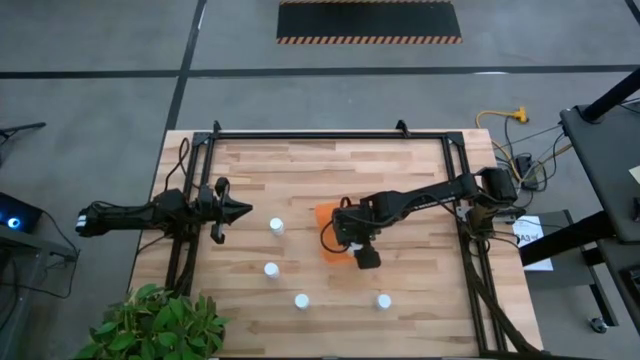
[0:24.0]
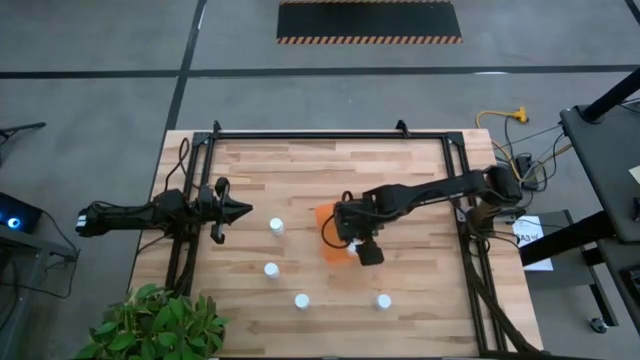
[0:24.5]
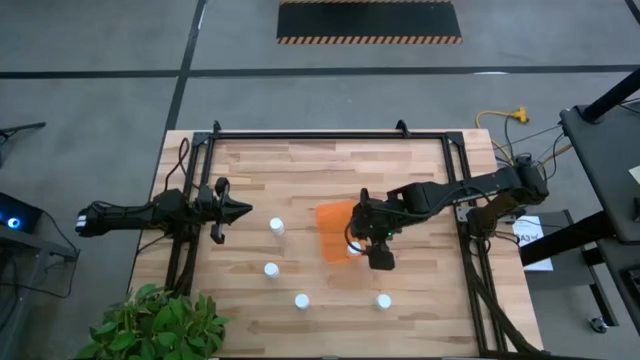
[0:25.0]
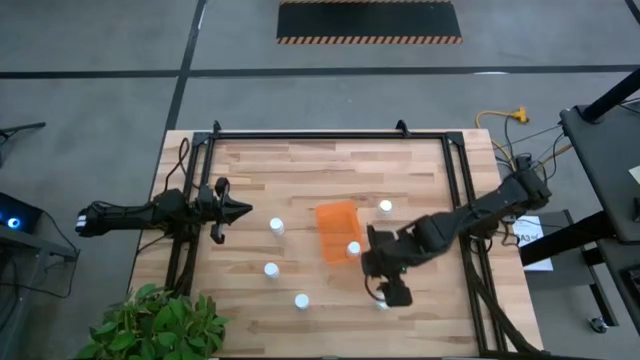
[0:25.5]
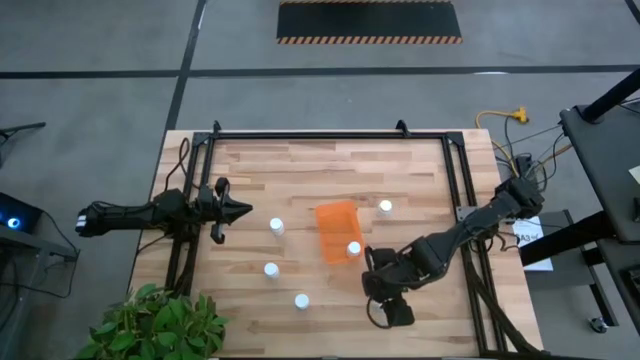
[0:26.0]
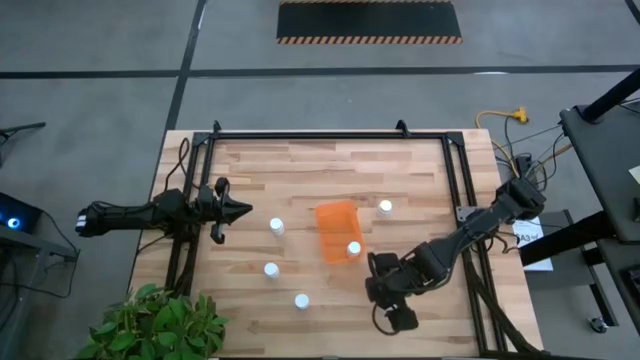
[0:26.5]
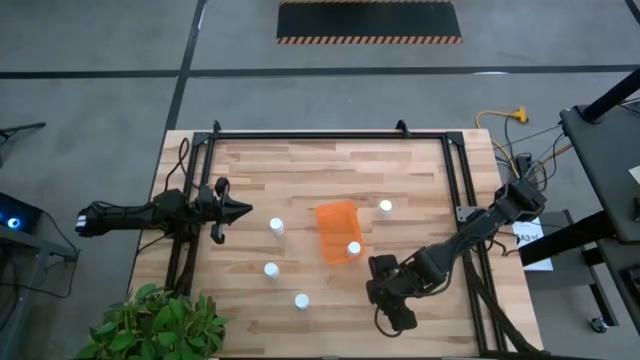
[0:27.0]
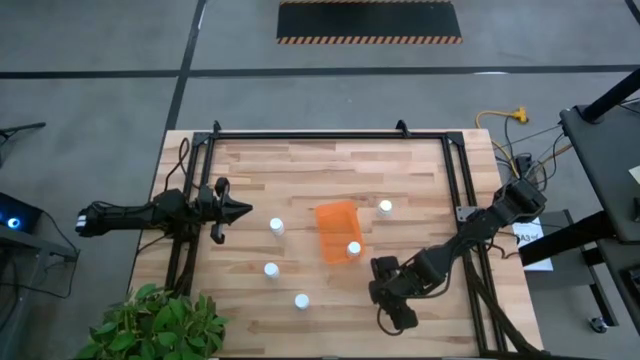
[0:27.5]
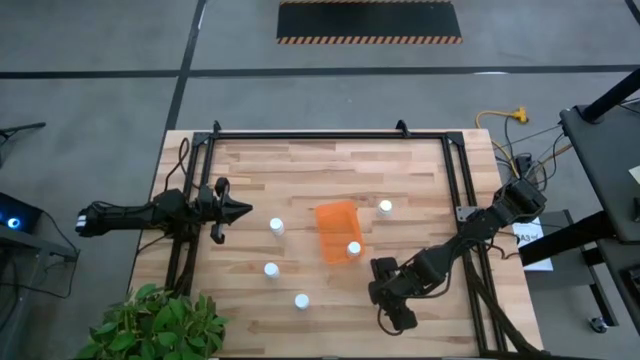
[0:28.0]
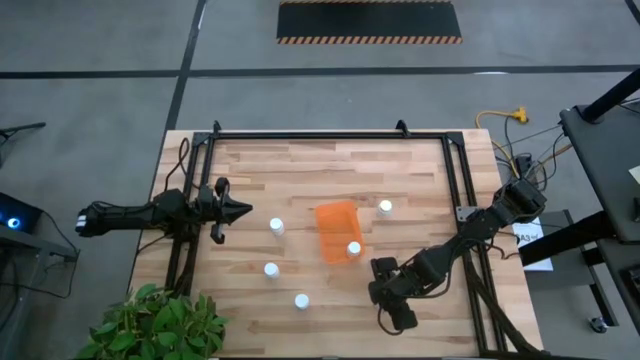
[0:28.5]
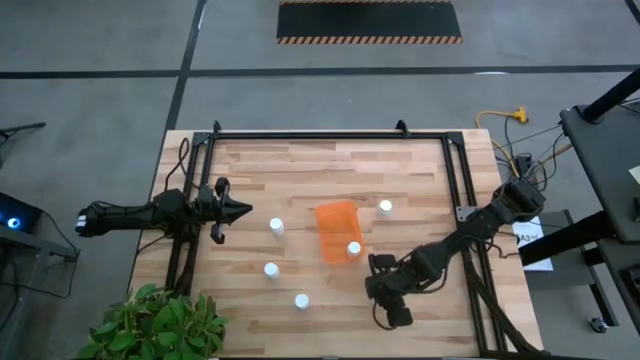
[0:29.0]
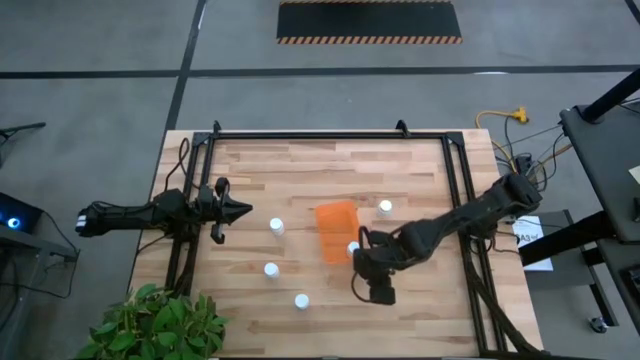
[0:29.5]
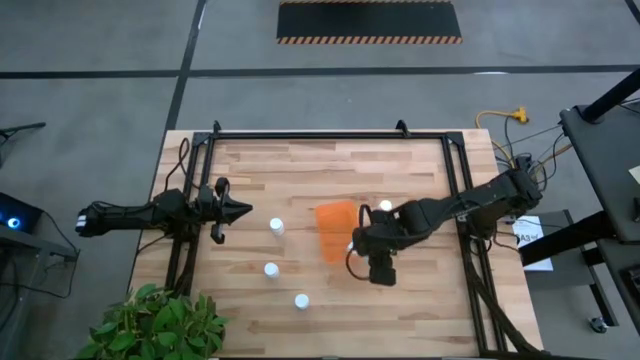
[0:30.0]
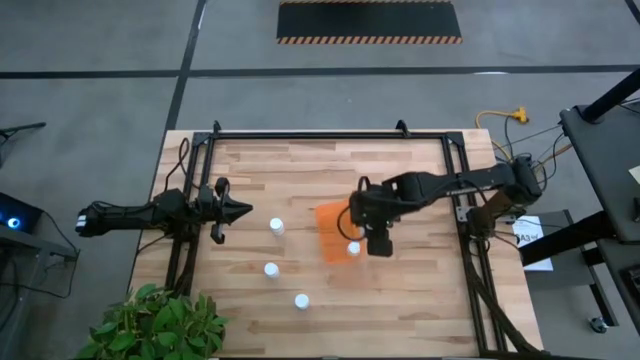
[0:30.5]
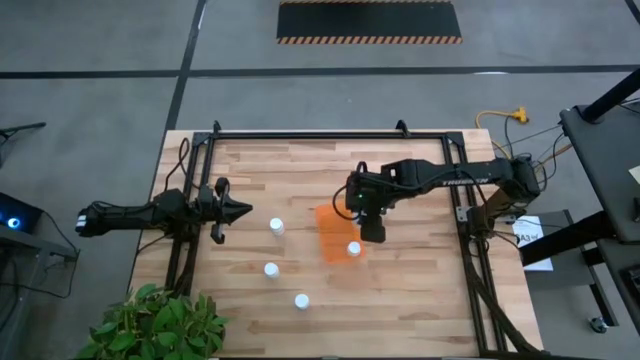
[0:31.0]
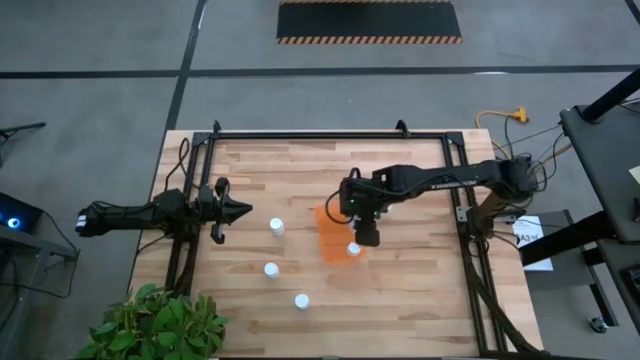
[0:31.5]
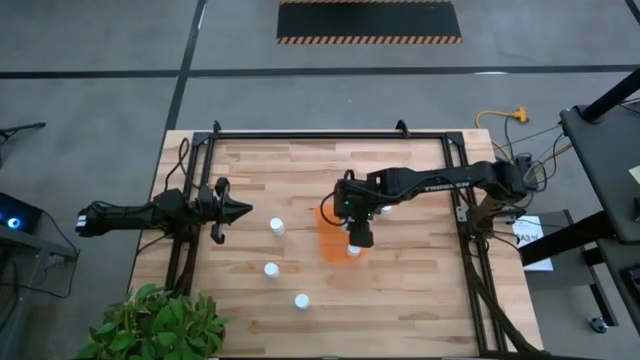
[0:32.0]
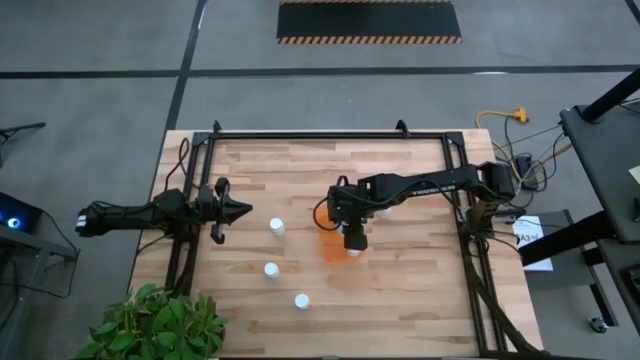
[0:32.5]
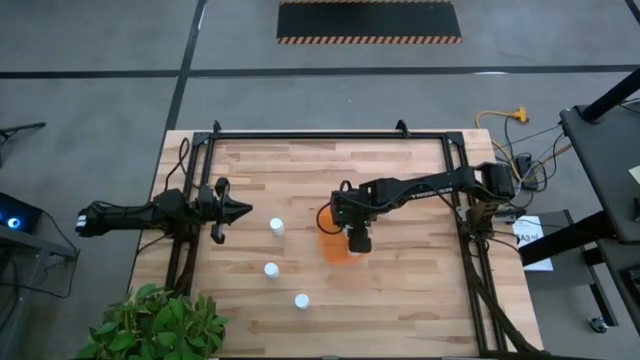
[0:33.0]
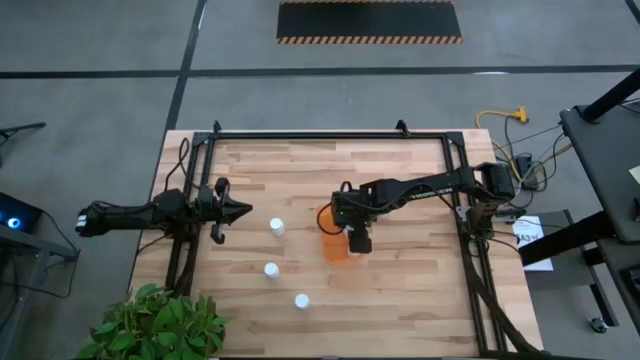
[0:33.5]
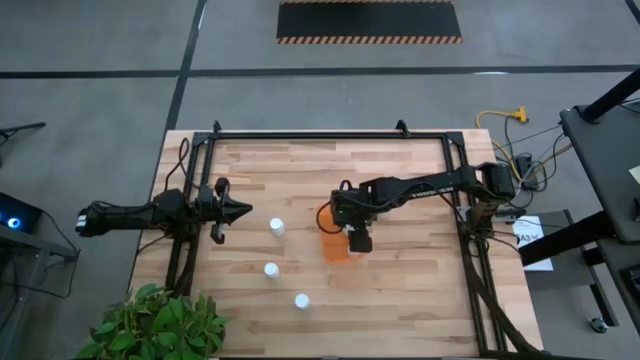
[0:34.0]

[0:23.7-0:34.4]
Task: Pick and place pill bottles into a basket
Put the bottom right white pill bottle into the orange bin

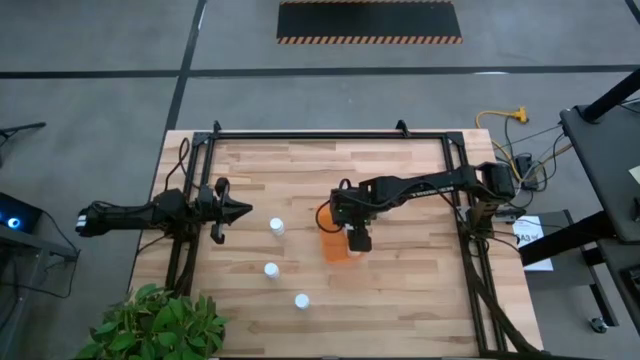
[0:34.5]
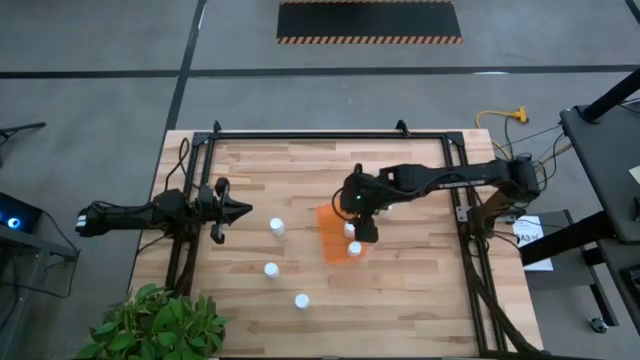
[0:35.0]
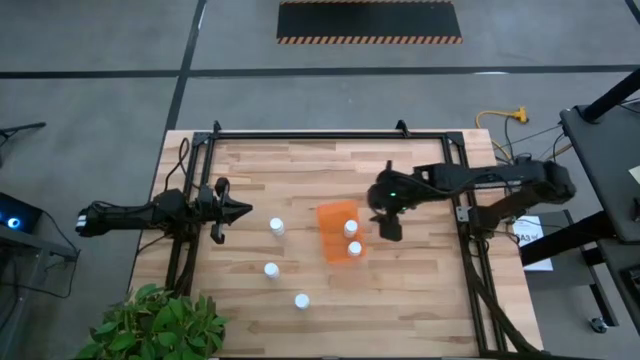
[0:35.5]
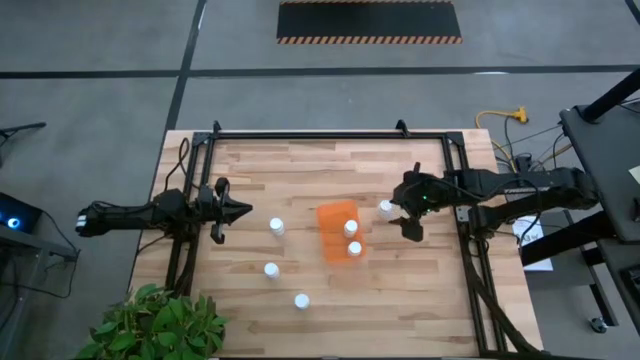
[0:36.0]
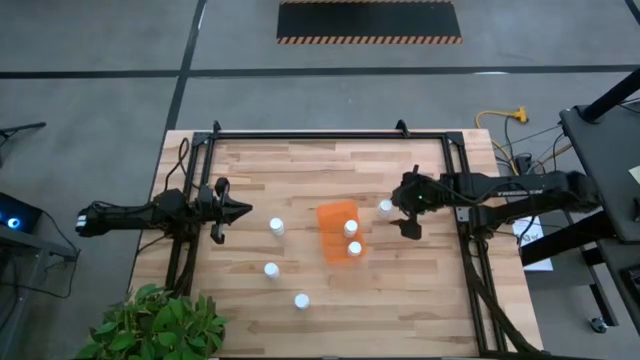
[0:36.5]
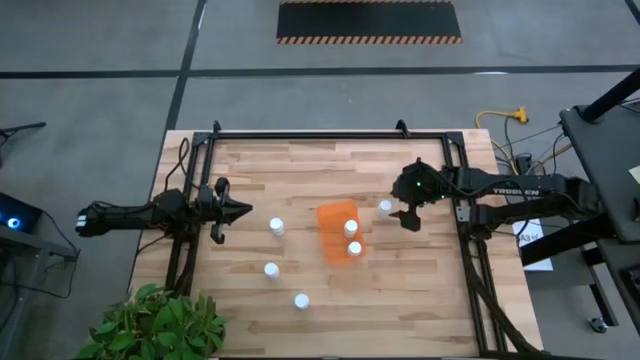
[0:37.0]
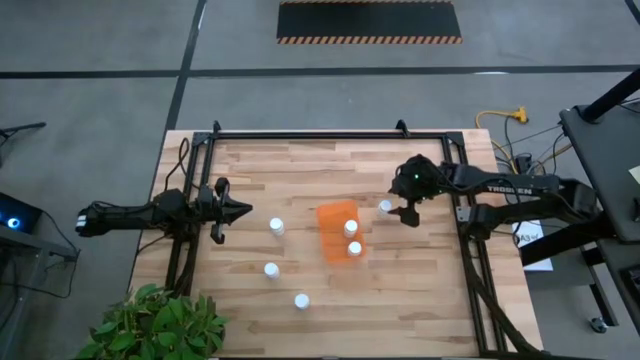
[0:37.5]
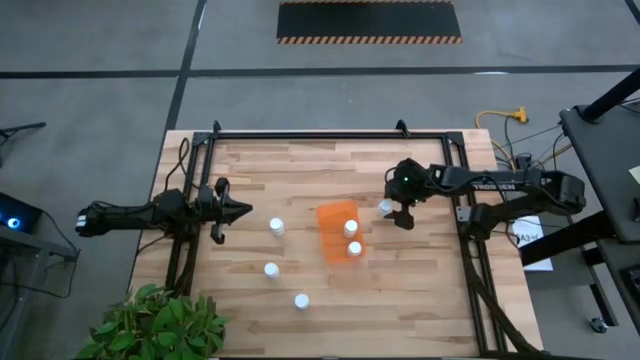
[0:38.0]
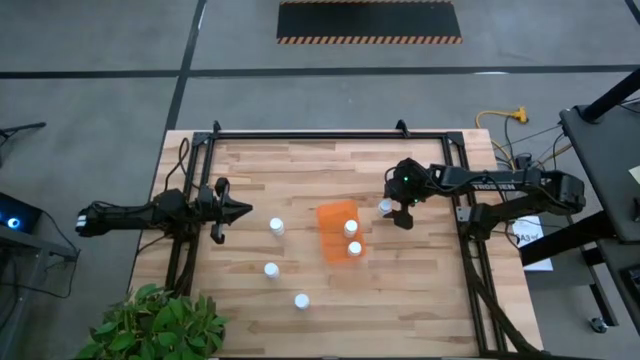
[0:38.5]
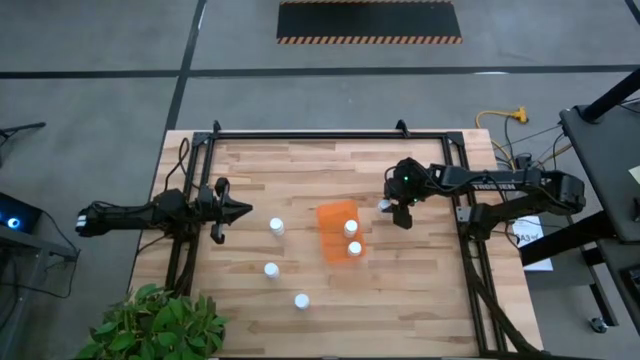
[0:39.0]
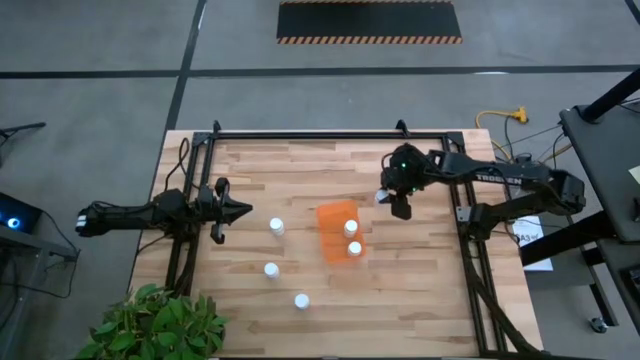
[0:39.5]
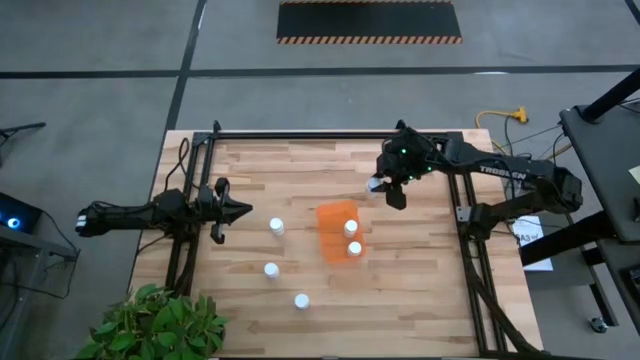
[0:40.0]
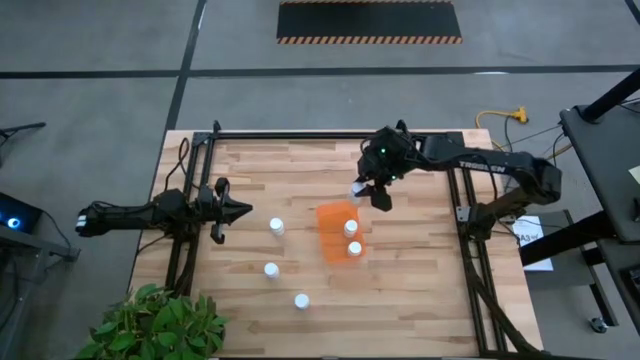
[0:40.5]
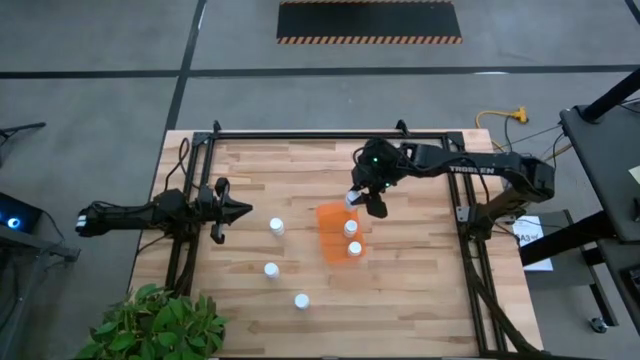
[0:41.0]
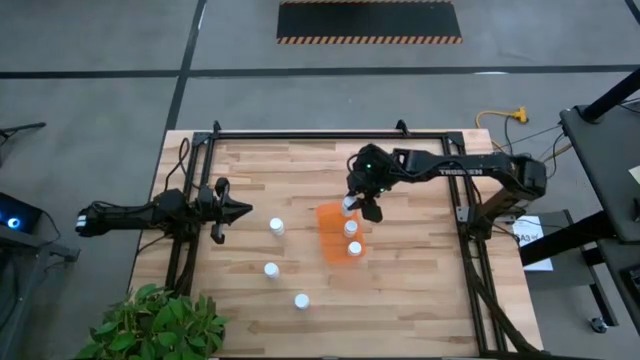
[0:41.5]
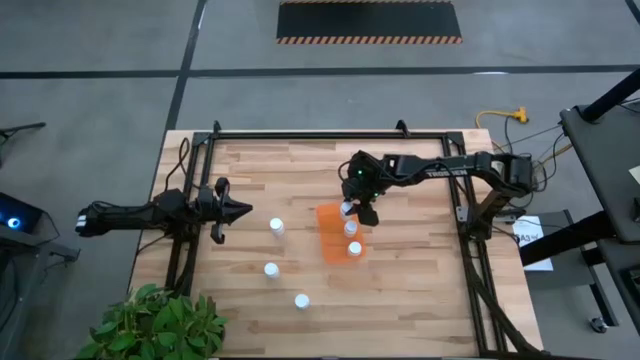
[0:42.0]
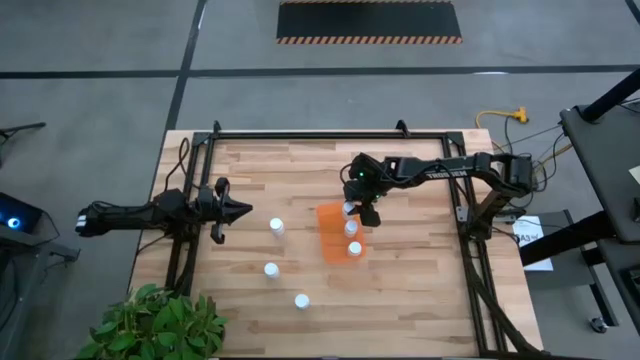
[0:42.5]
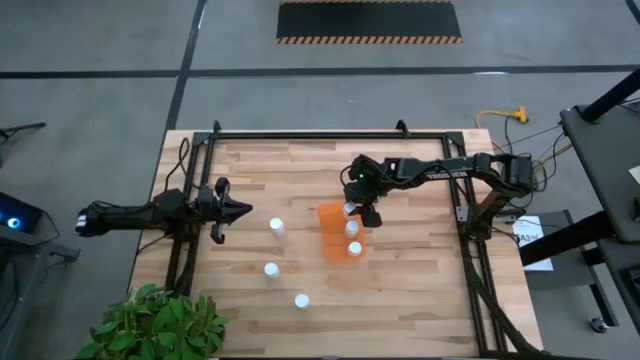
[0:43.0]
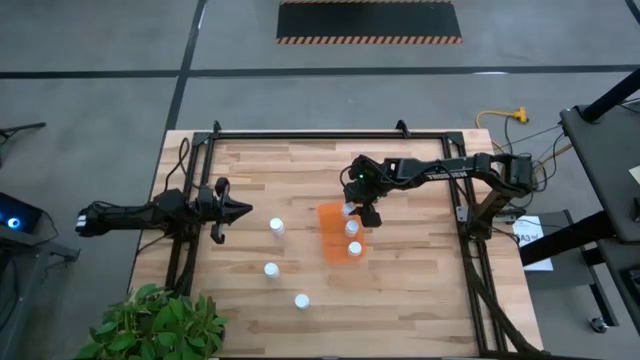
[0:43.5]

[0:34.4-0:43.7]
Put the top right white pill bottle into the orange bin

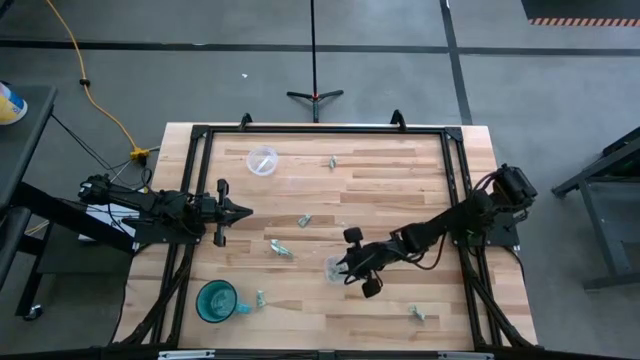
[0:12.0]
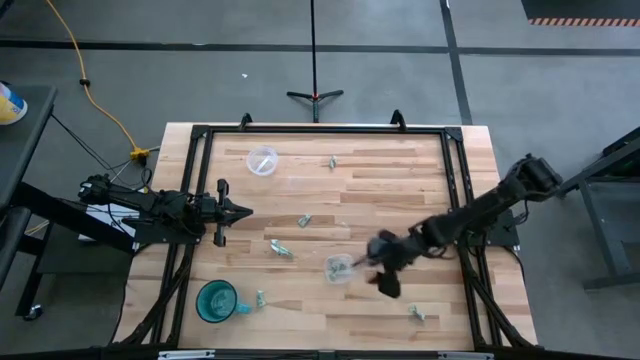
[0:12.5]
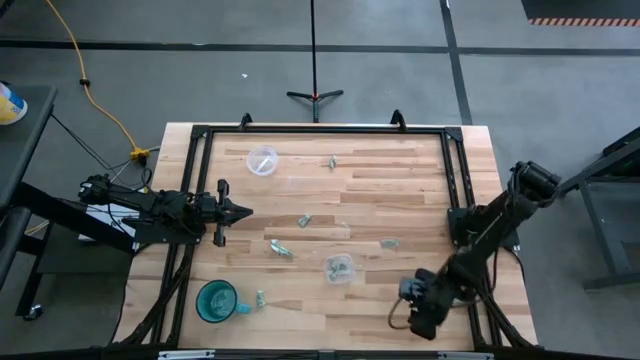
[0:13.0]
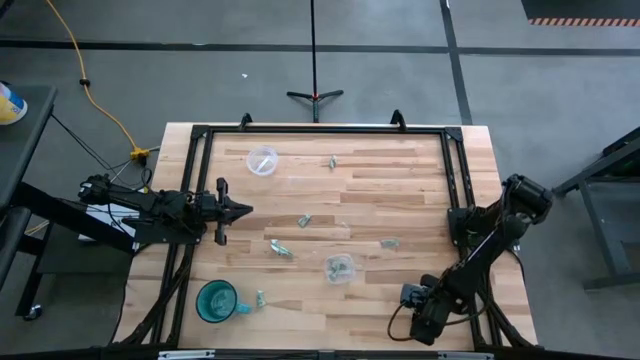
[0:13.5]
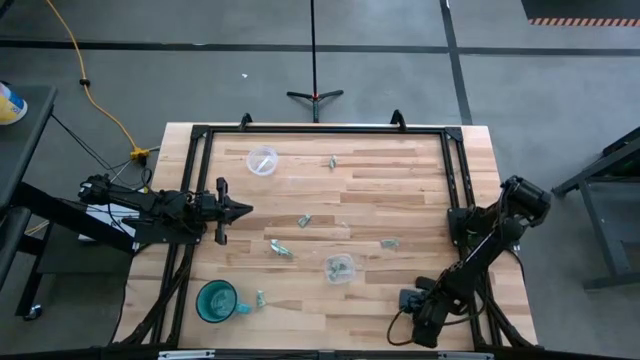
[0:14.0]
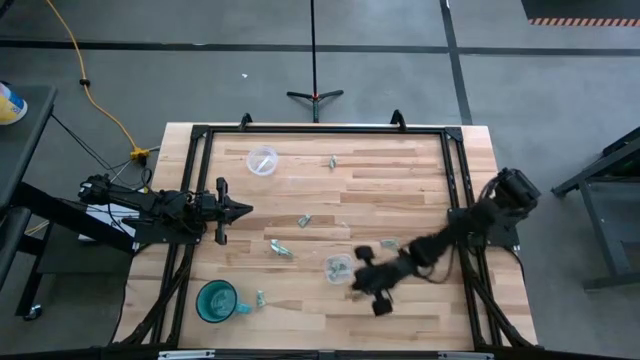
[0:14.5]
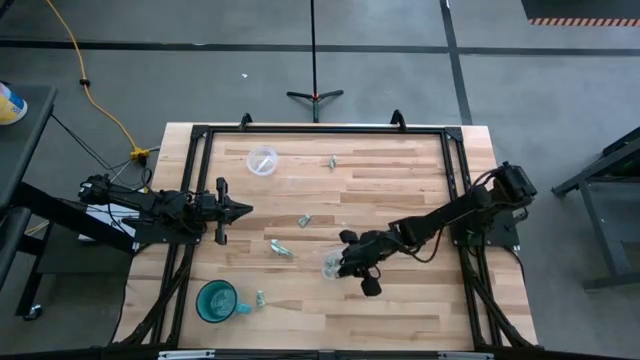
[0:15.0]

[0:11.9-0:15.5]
Task: Pick and place Stevia / Truvia into bins
Put the stevia packet into the bottom transparent container
